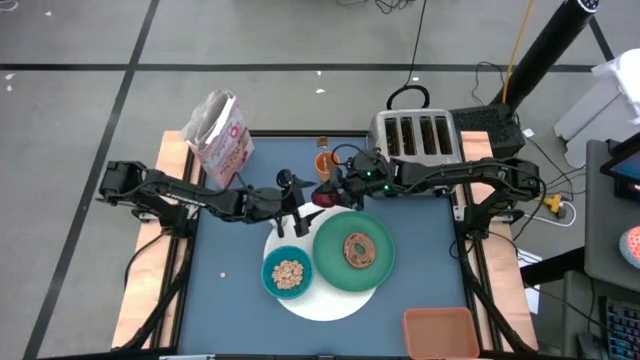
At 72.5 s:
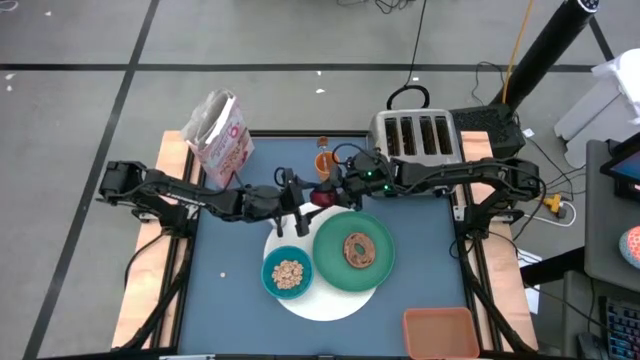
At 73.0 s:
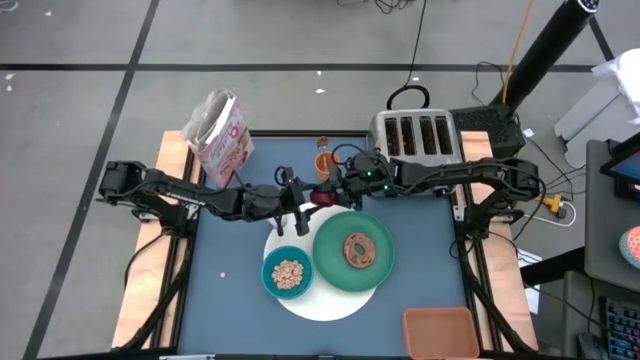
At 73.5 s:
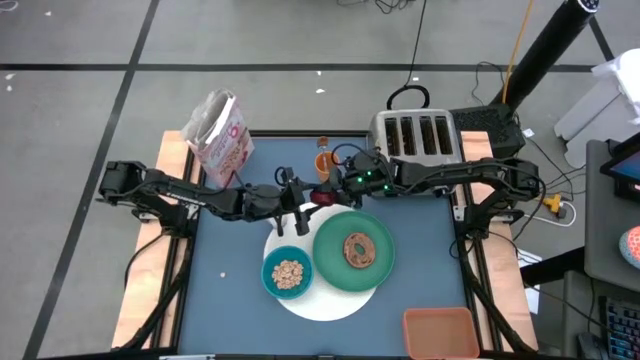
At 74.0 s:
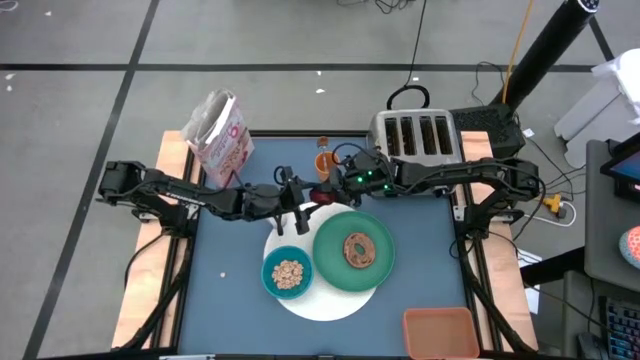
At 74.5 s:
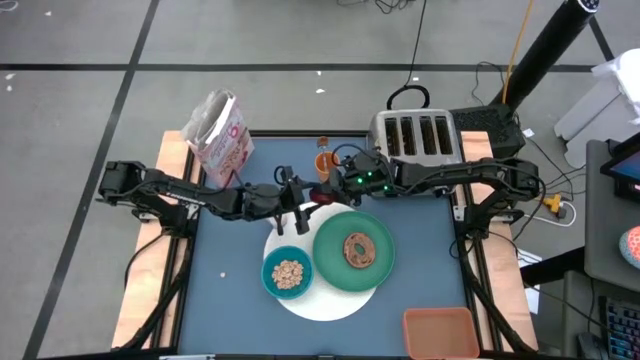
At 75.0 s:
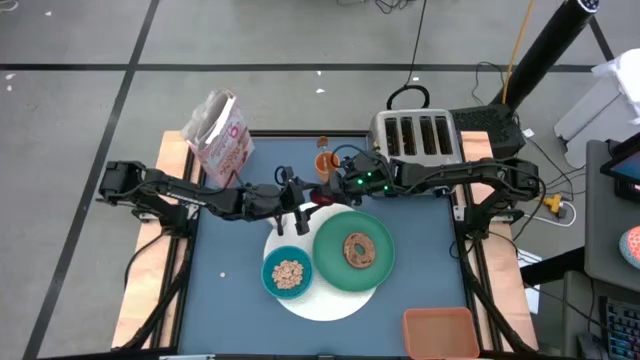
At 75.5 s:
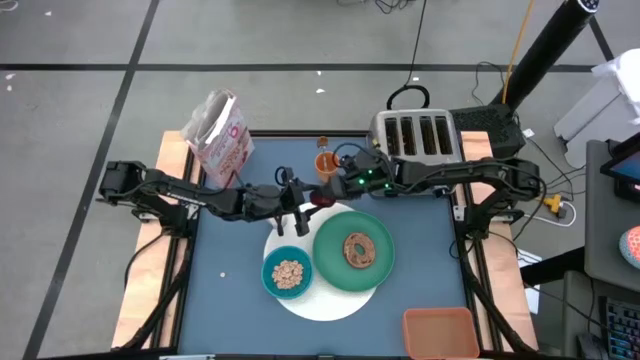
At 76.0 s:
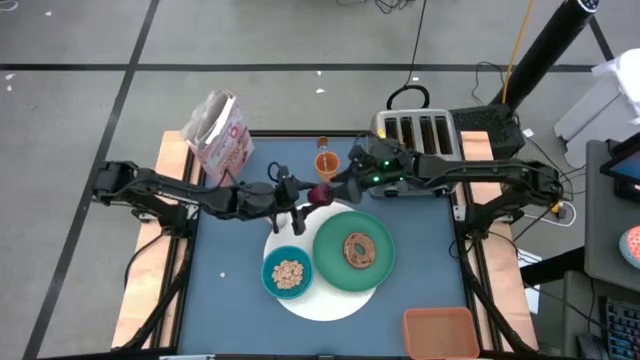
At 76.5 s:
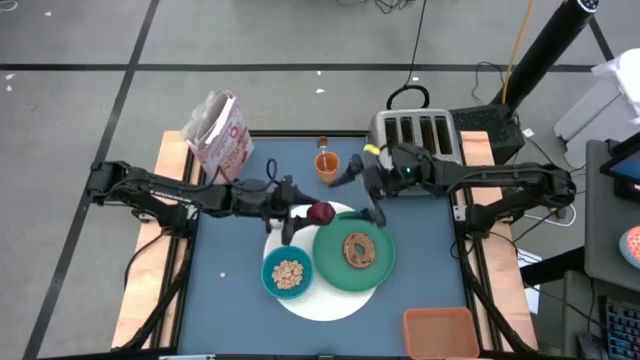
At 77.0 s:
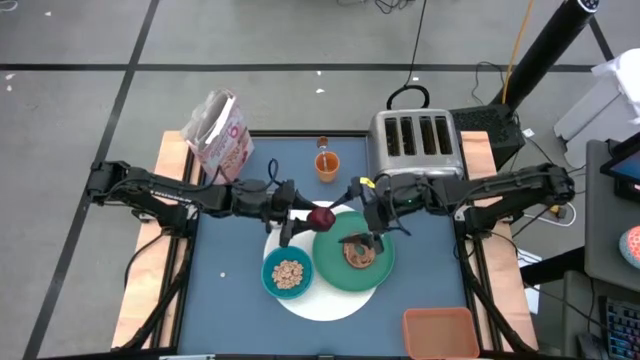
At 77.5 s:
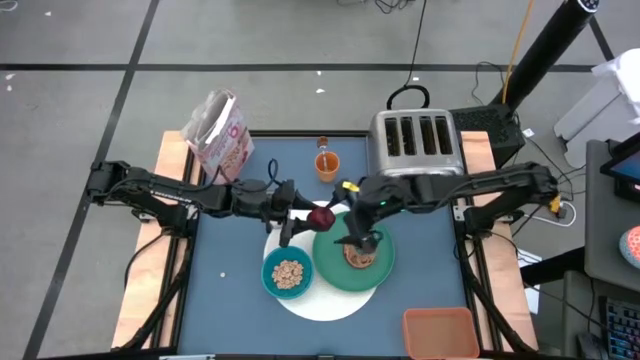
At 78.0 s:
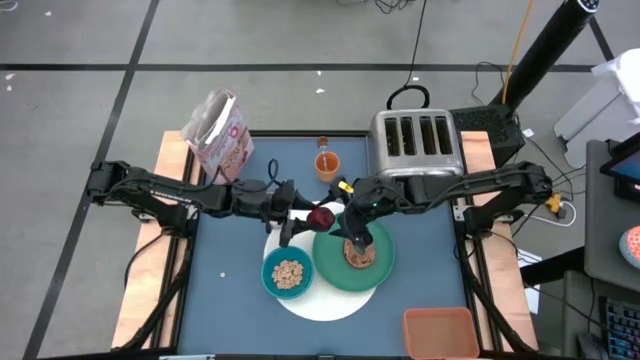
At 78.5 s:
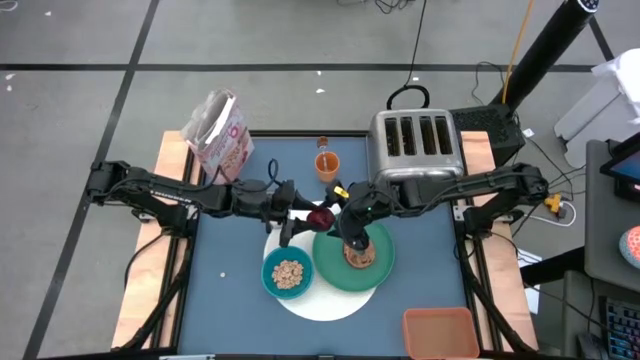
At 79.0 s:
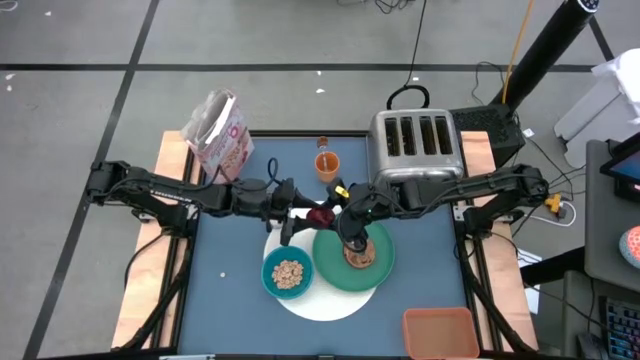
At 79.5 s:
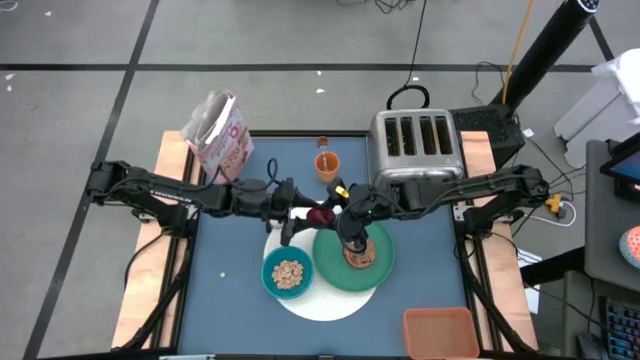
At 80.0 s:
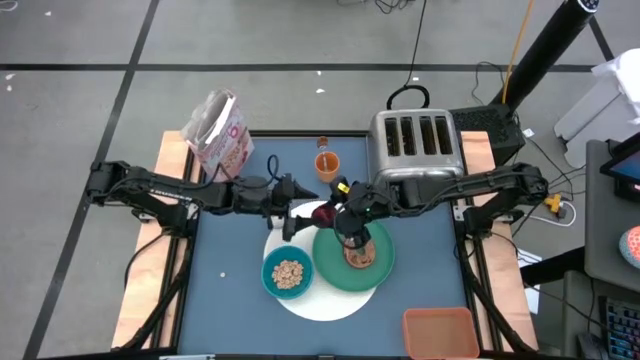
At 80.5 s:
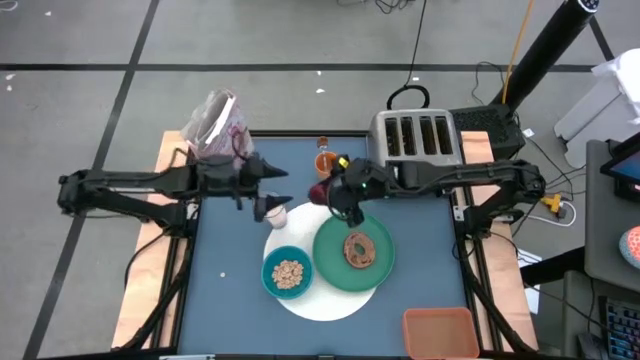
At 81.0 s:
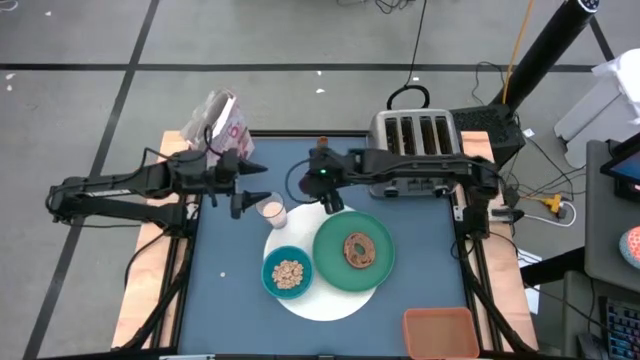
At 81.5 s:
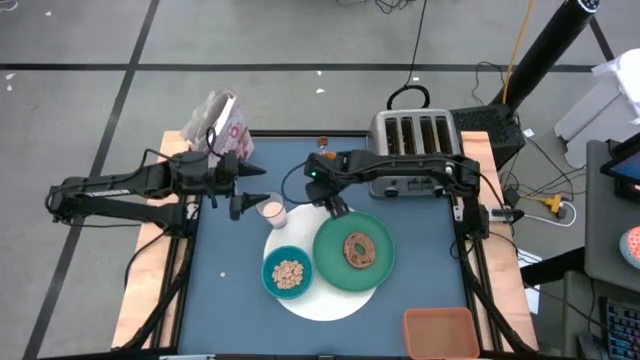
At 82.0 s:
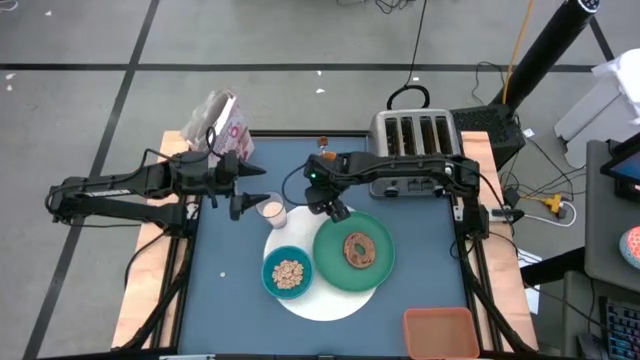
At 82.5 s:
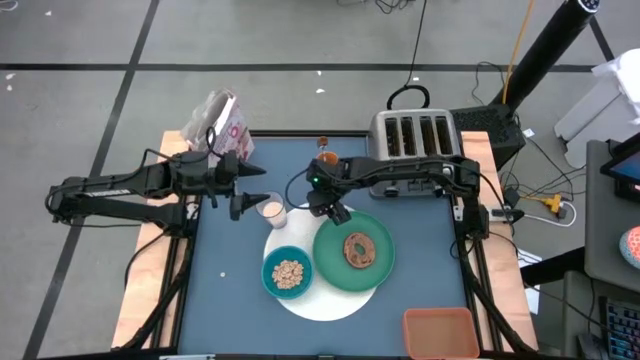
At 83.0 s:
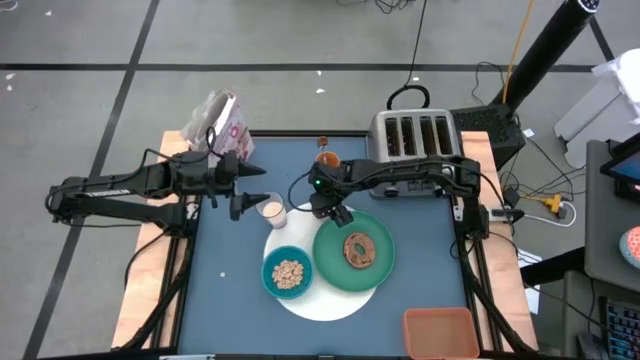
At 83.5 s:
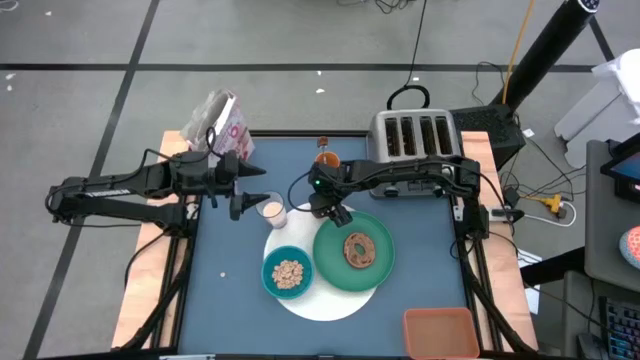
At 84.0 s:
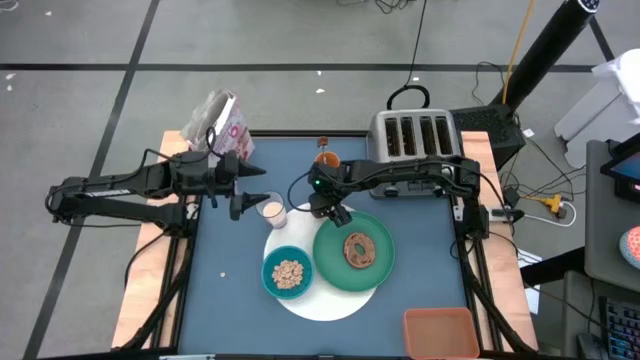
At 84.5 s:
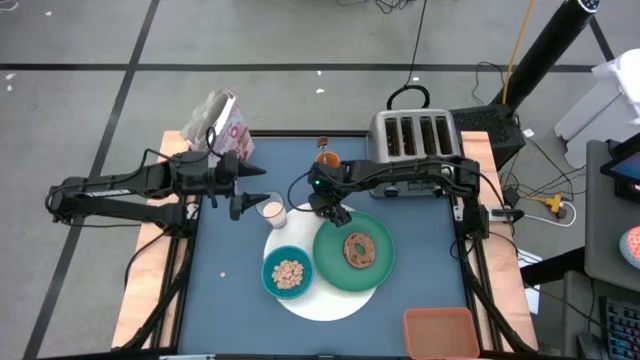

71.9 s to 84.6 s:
Task: Arrange a breakfast setting
Put the apple on the white placemat to the top of the green plate

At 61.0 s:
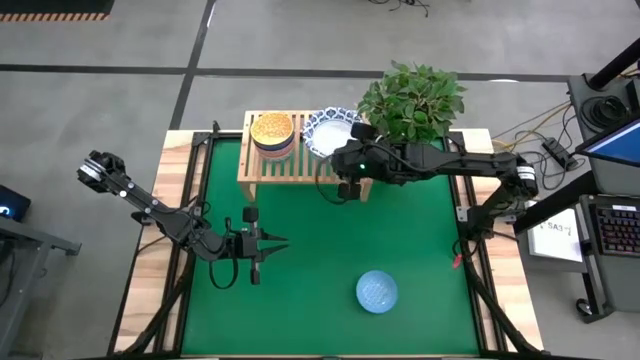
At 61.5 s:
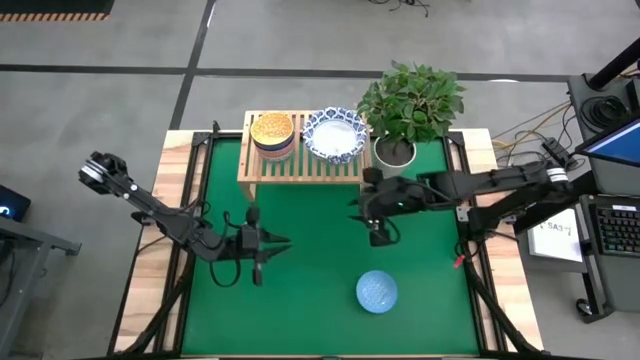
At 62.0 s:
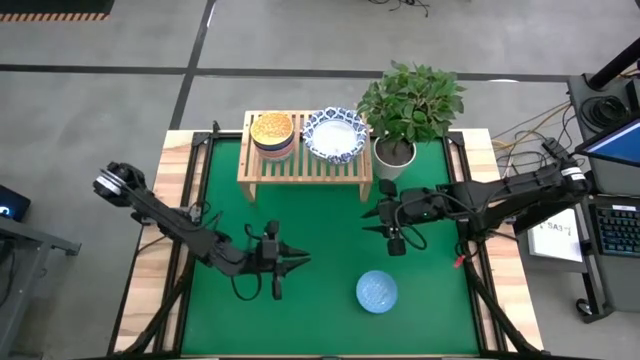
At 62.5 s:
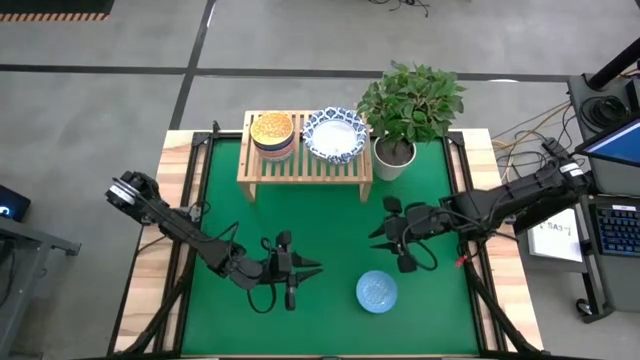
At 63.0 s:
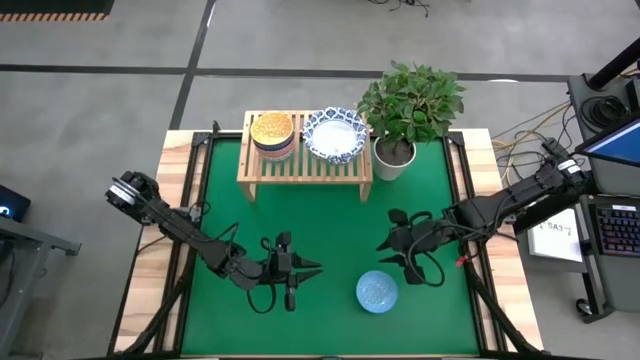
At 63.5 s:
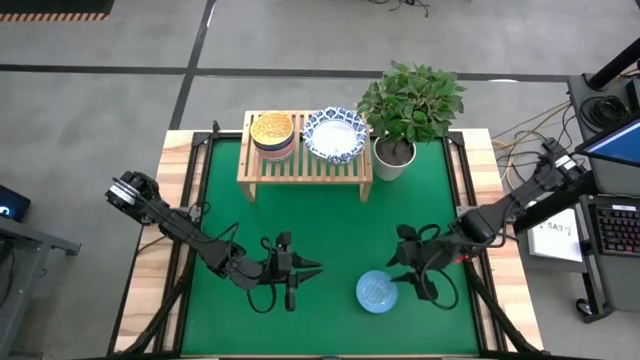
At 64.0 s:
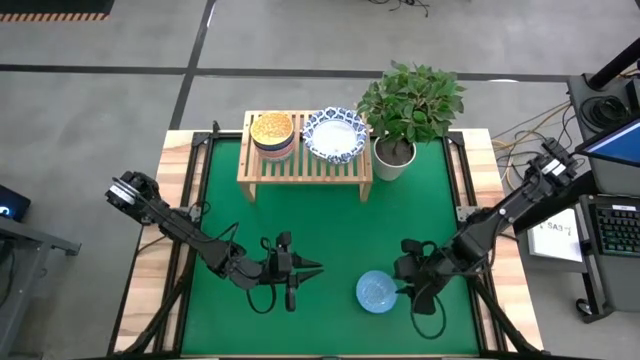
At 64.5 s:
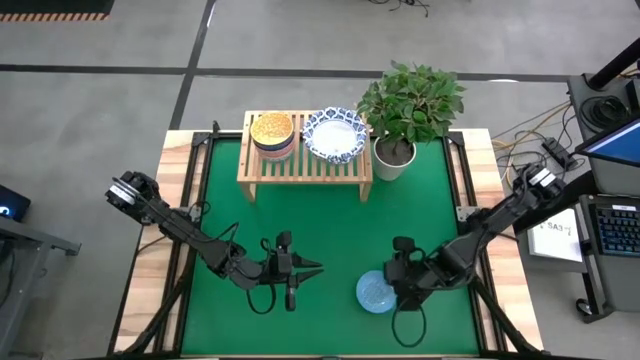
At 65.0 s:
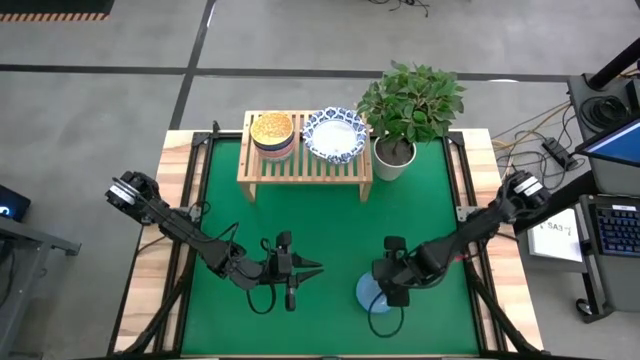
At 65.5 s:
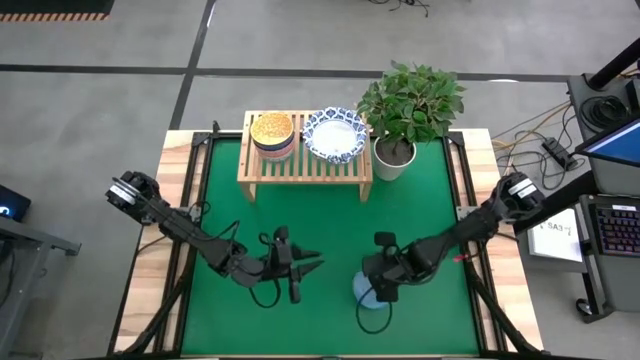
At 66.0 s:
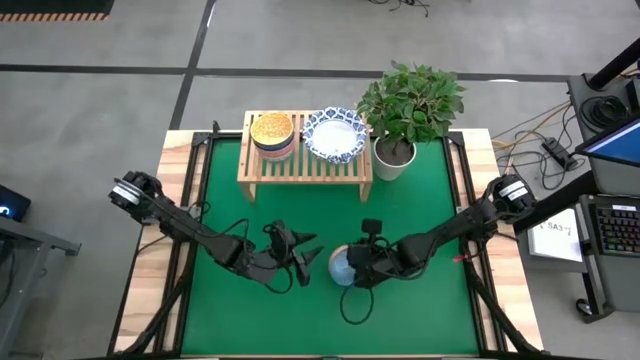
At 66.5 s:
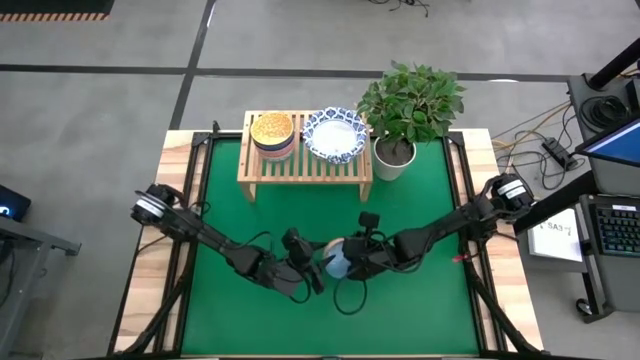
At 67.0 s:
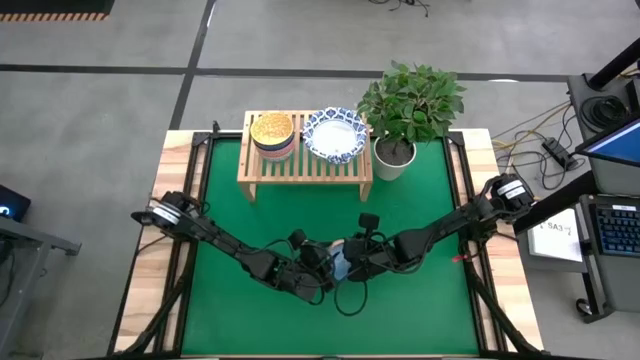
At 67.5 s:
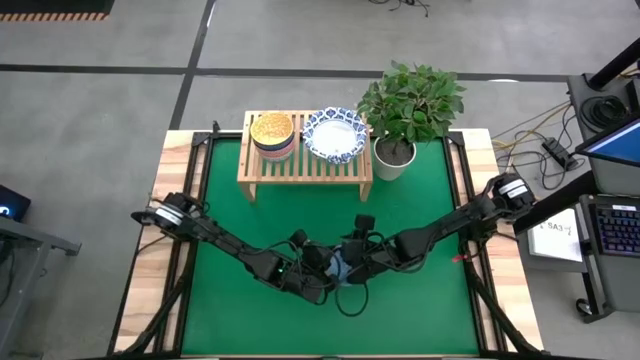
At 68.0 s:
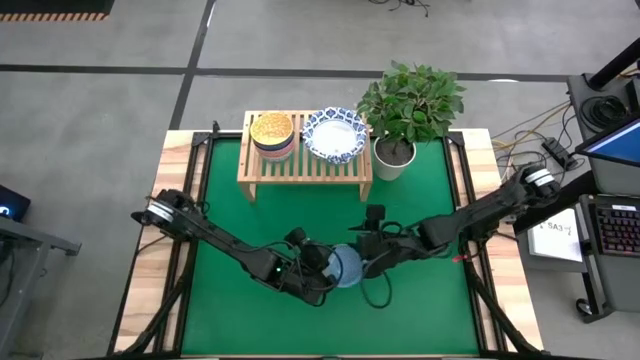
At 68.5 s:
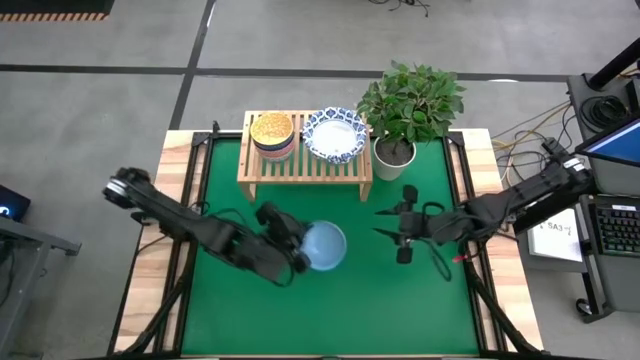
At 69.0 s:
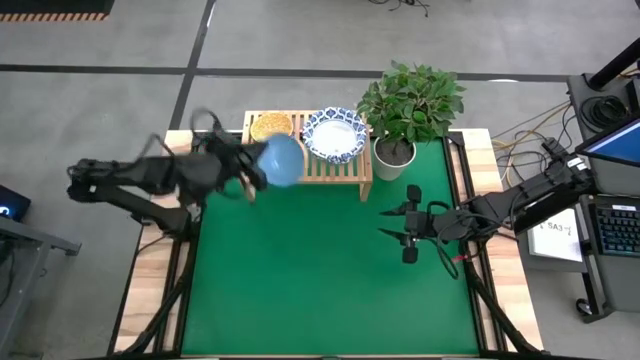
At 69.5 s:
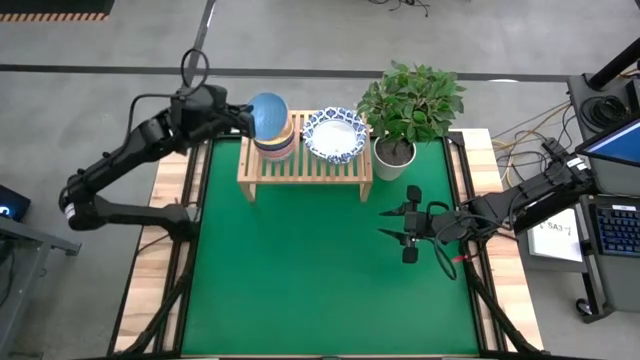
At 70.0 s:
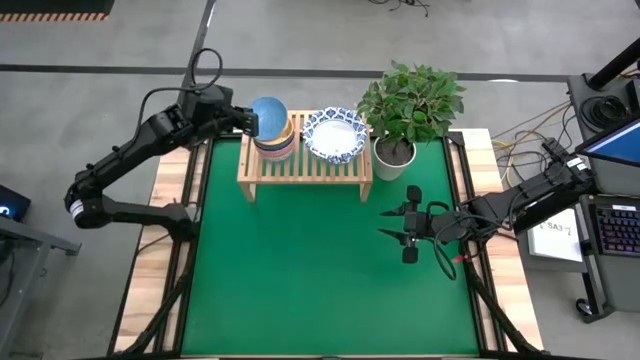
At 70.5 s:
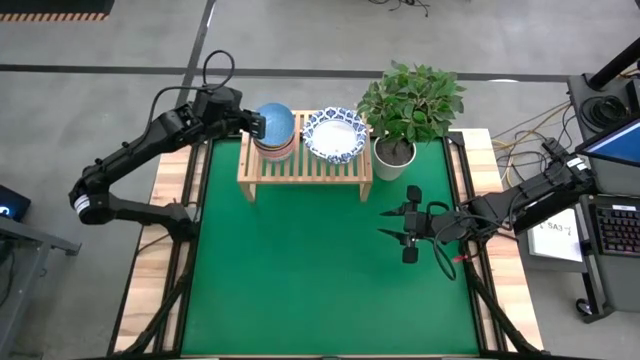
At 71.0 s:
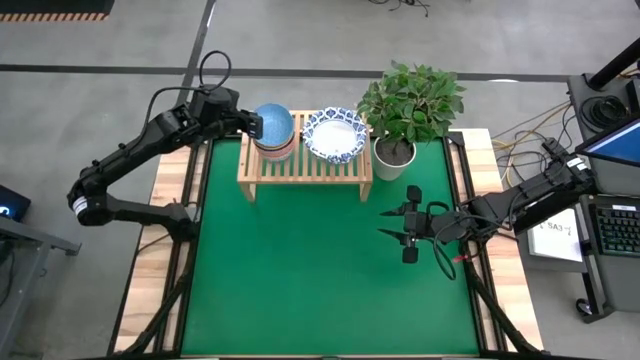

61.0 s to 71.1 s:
Task: Place and stack plates onto a shelf
Stack the light blue bowl on top of the yellow bowl on the shelf
